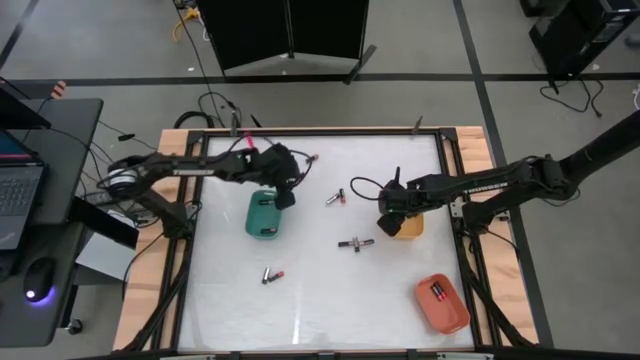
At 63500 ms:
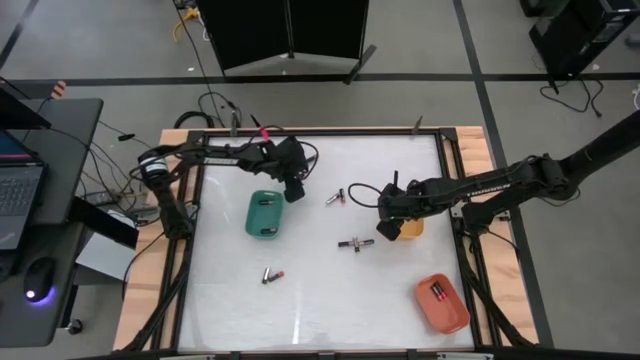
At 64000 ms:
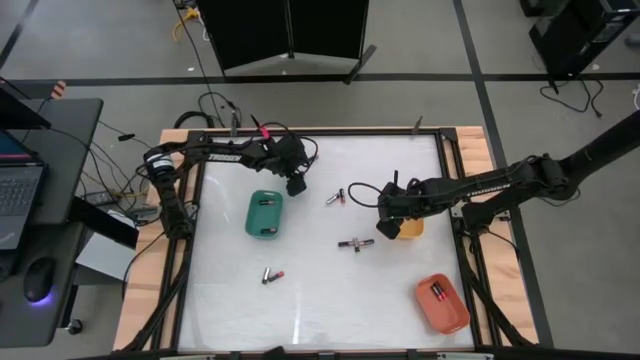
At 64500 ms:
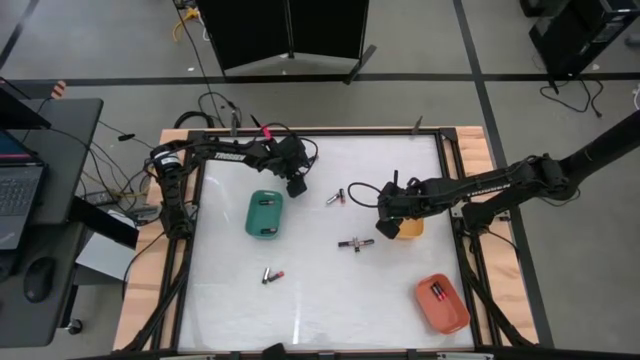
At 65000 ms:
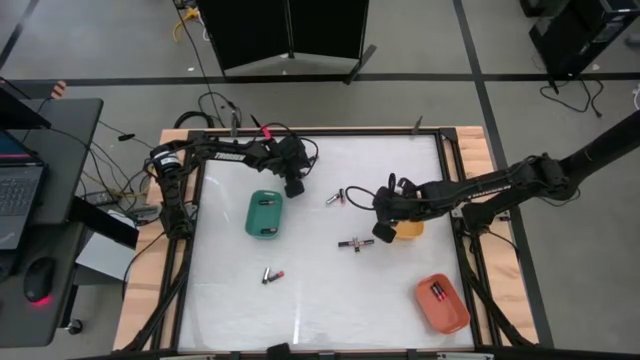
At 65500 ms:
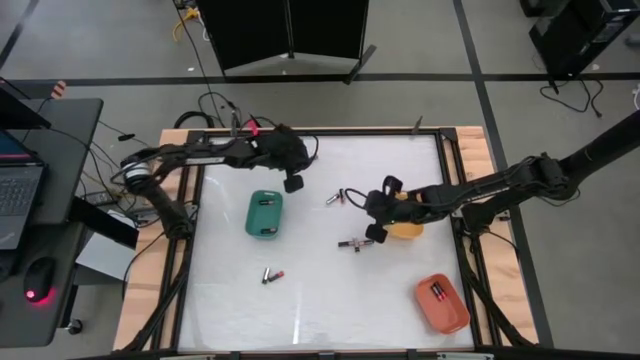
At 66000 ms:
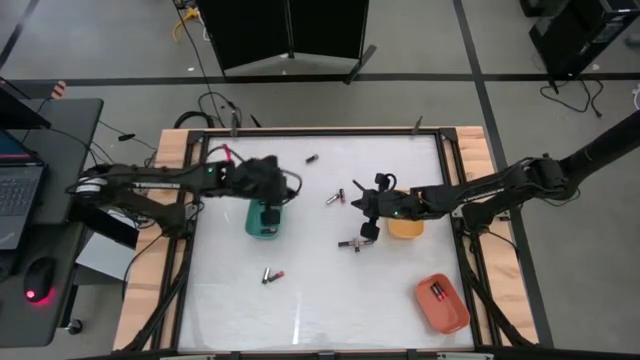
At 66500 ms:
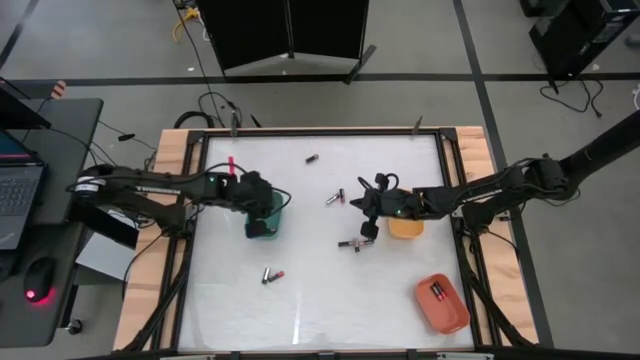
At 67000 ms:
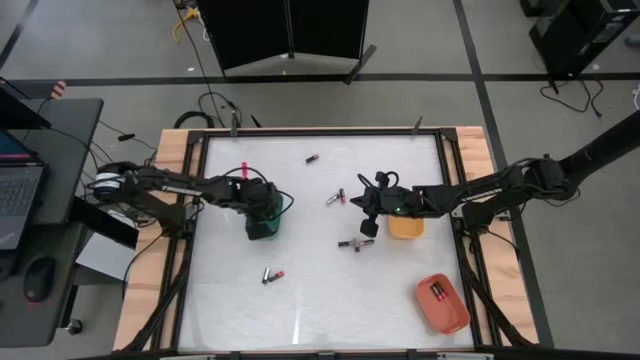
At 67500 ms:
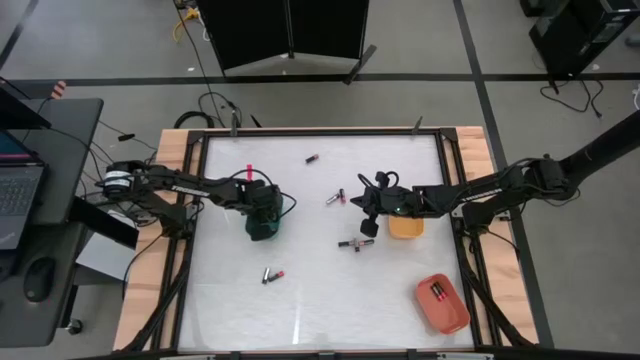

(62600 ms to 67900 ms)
Task: Sort batteries
Put the black and copper battery into the green bin

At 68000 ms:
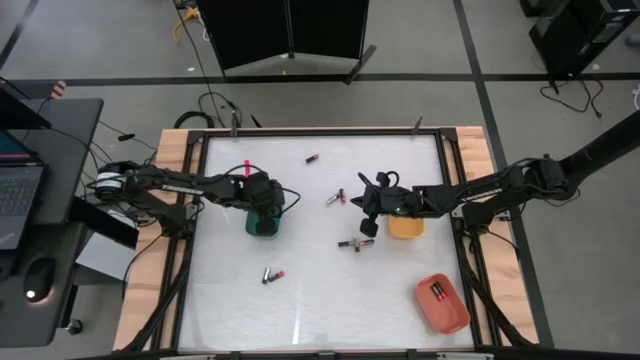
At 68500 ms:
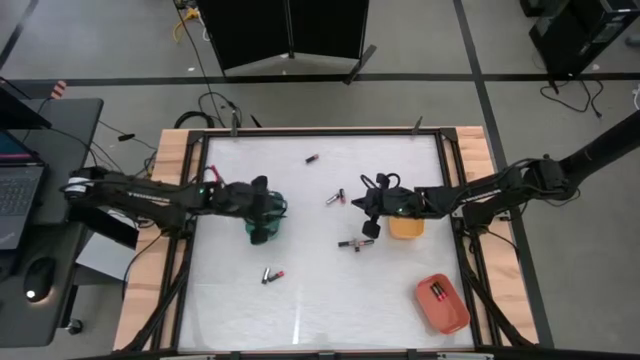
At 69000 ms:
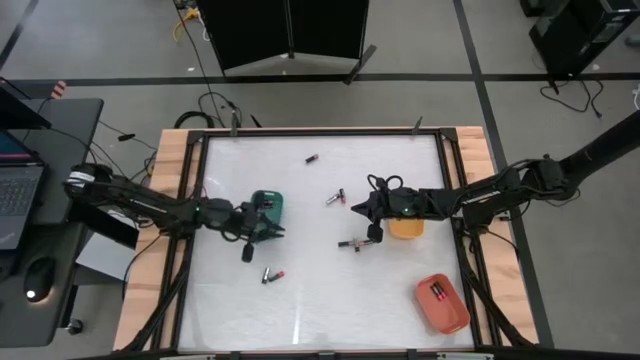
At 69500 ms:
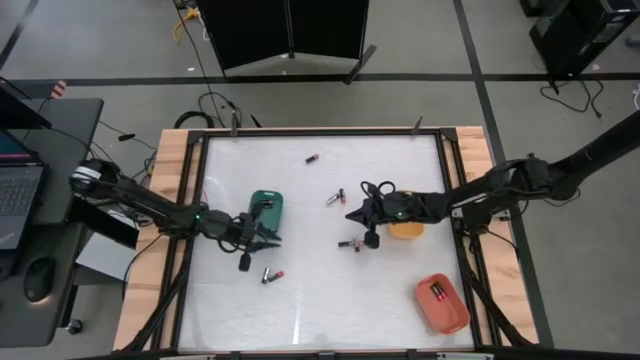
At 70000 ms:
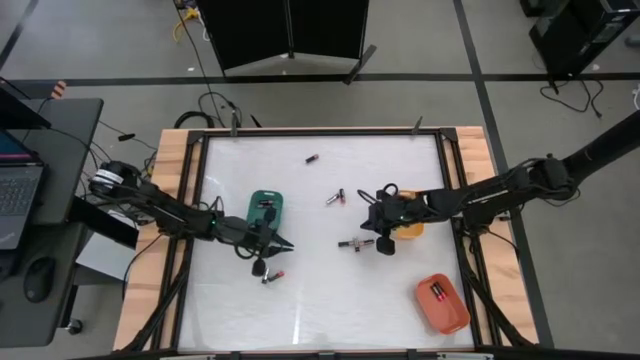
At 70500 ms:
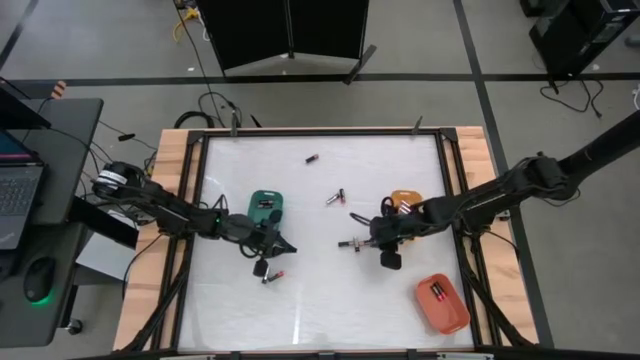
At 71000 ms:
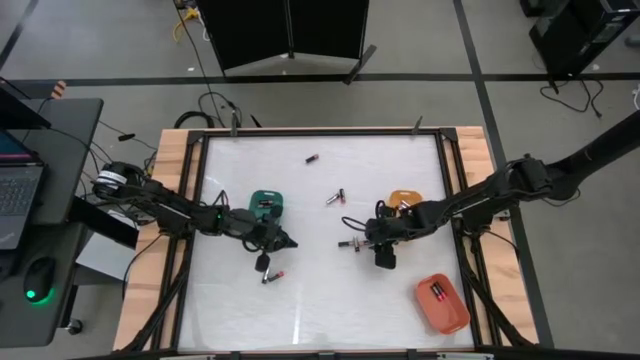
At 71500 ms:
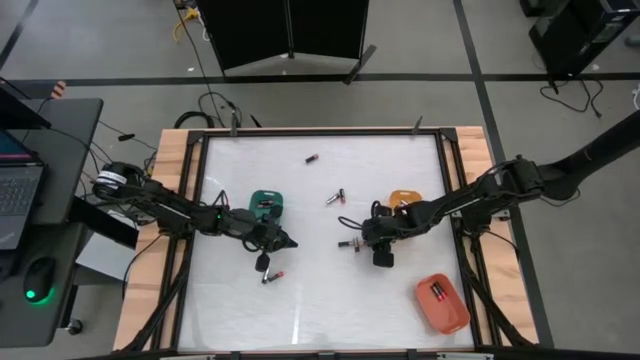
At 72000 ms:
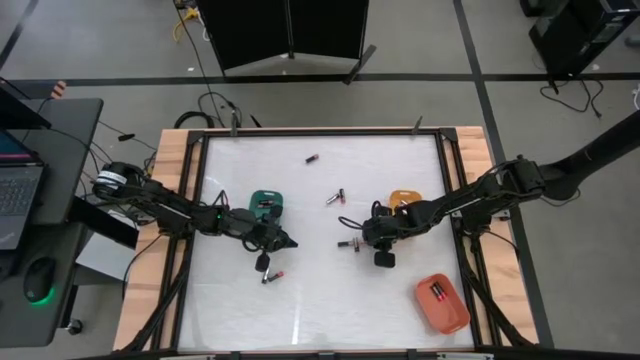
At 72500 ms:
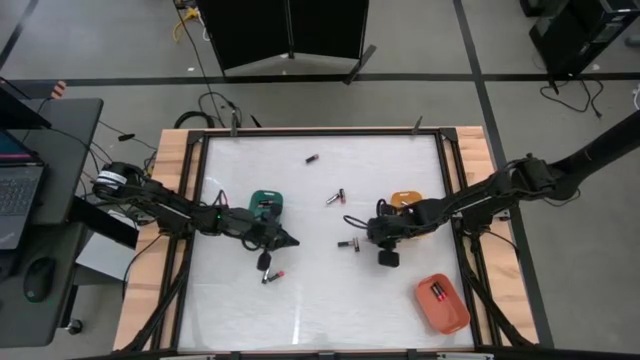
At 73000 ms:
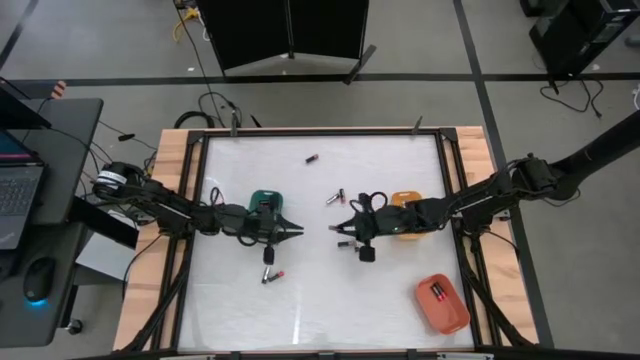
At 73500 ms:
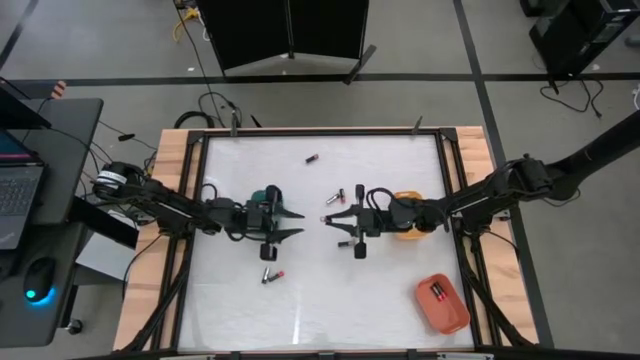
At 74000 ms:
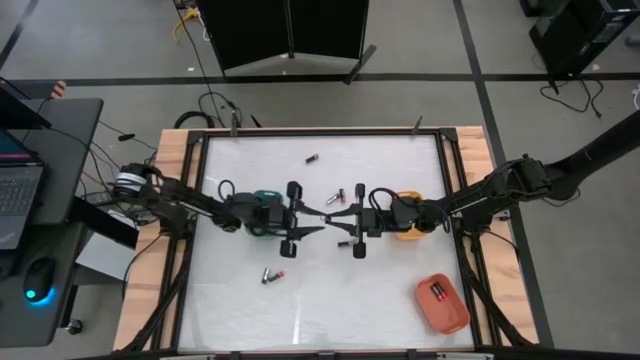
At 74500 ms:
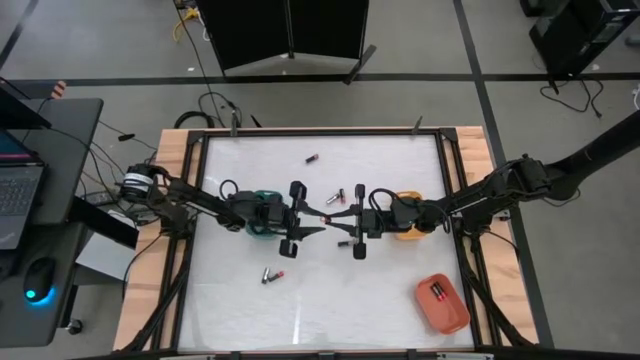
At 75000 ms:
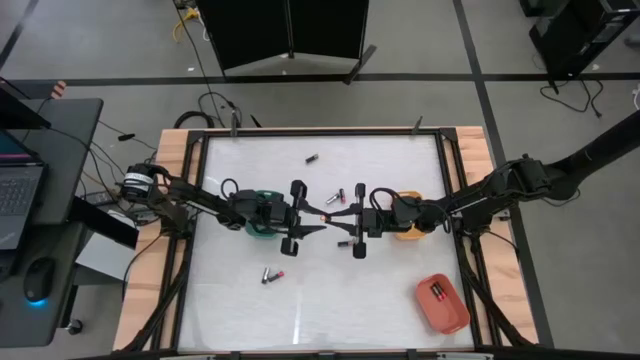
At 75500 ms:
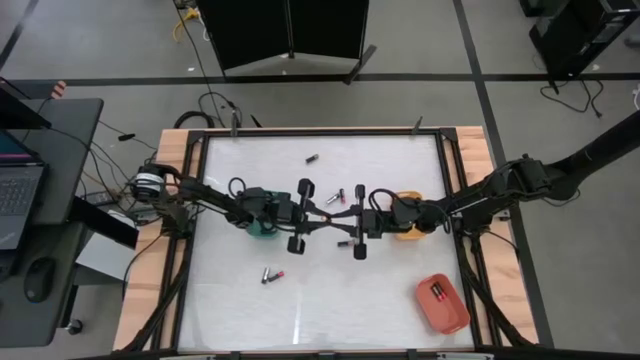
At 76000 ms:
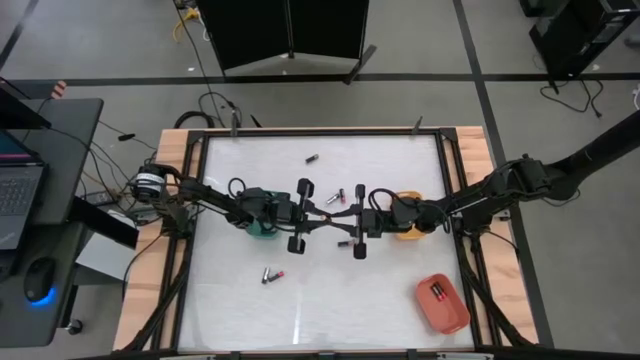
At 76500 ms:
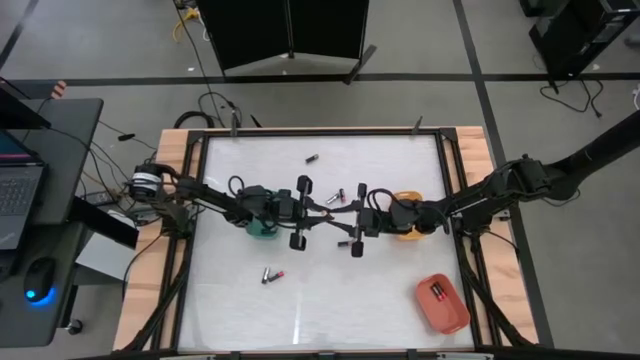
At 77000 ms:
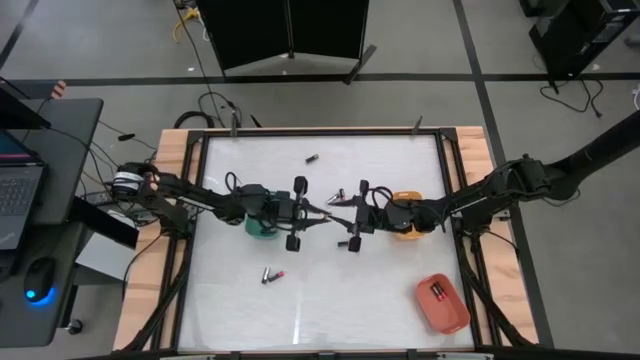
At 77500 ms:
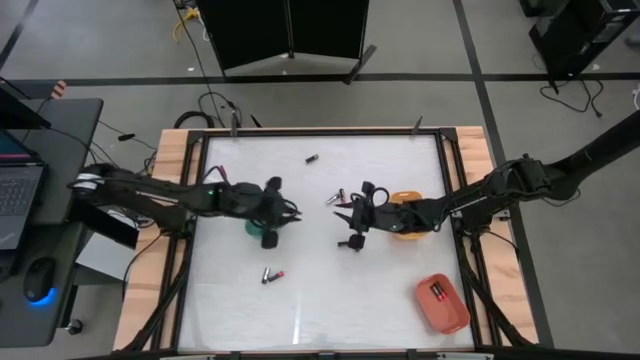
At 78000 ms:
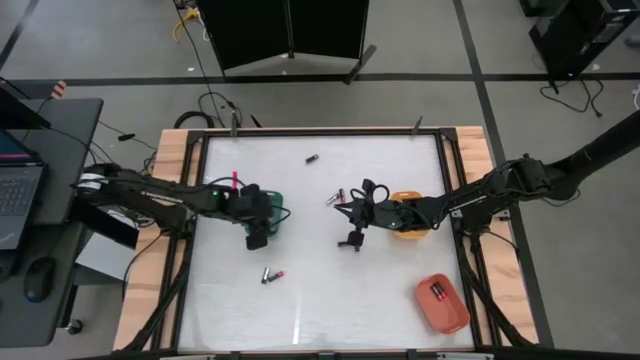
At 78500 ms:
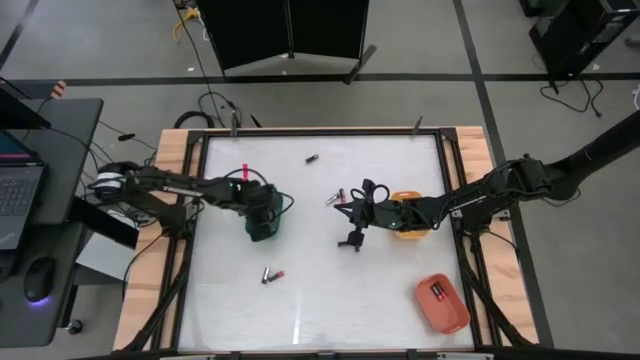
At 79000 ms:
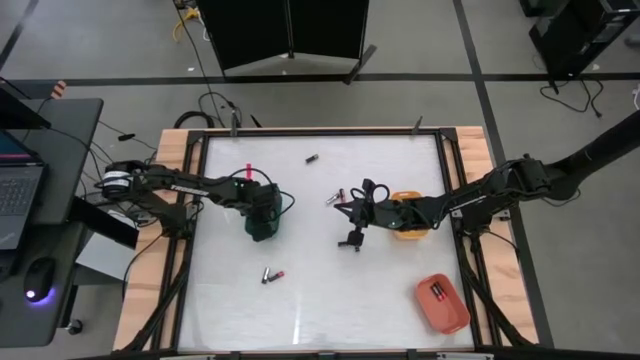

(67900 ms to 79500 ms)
Put the black and copper battery into the green bin

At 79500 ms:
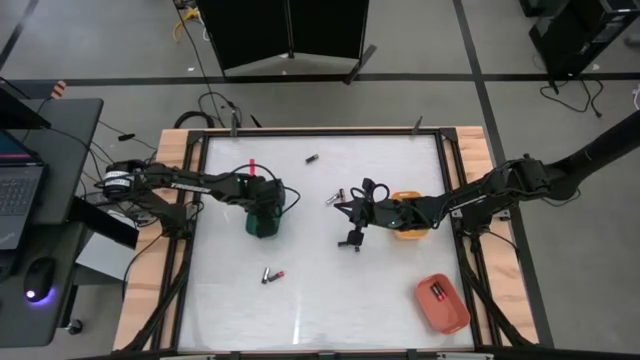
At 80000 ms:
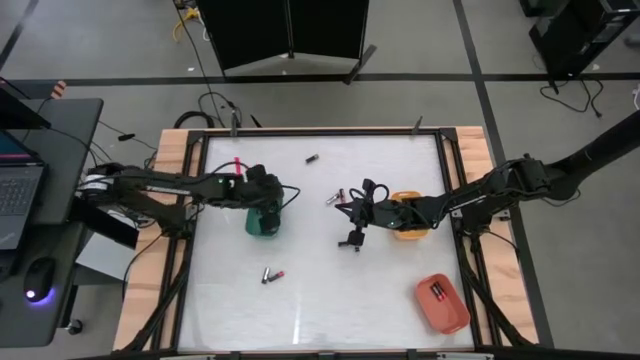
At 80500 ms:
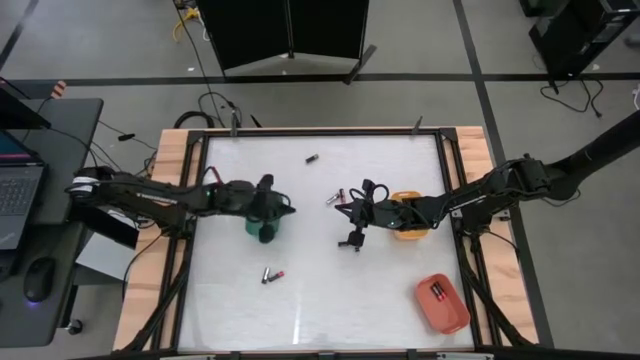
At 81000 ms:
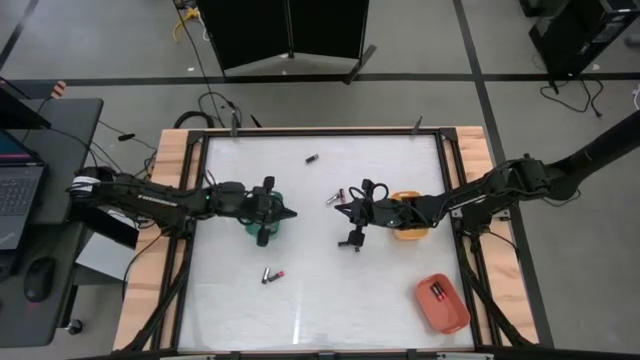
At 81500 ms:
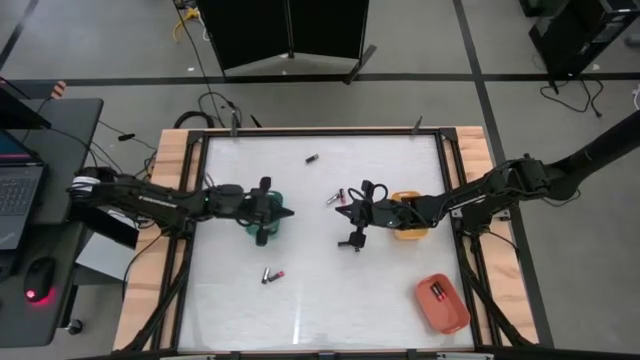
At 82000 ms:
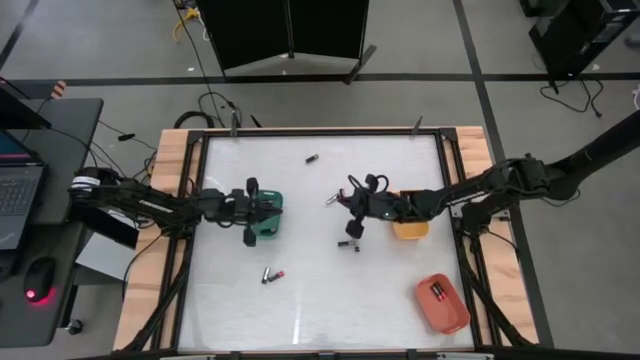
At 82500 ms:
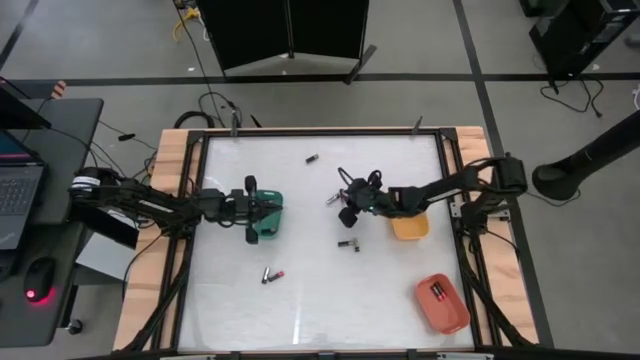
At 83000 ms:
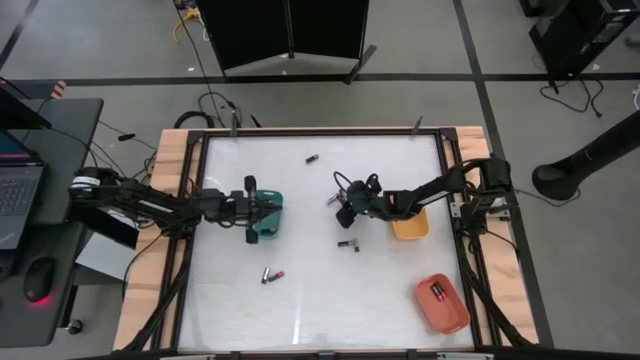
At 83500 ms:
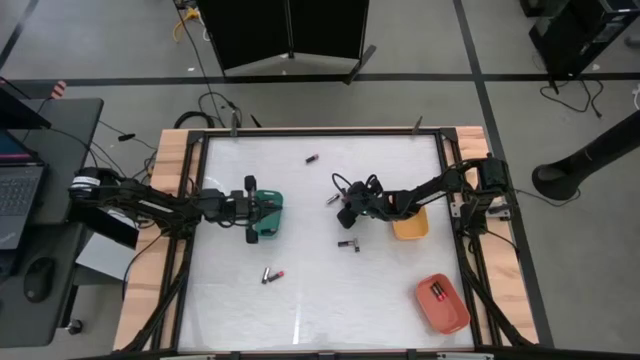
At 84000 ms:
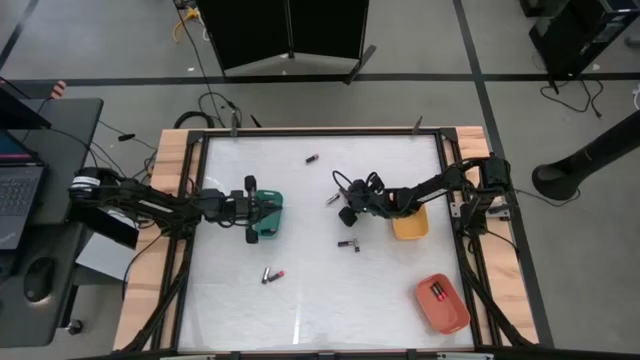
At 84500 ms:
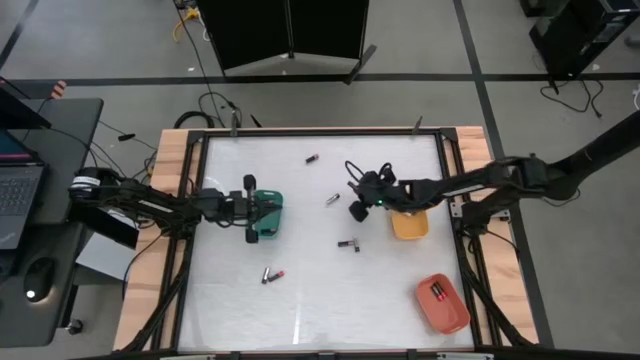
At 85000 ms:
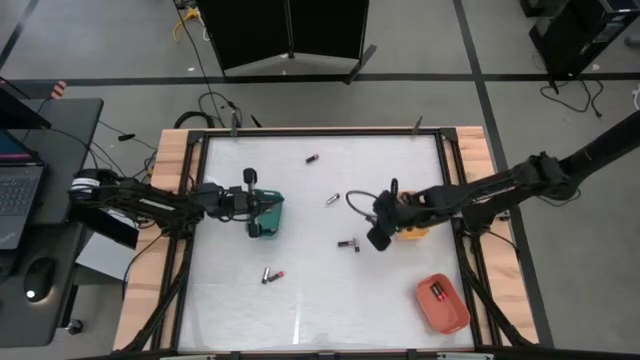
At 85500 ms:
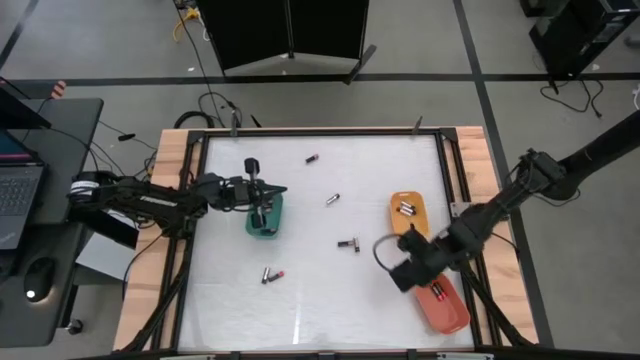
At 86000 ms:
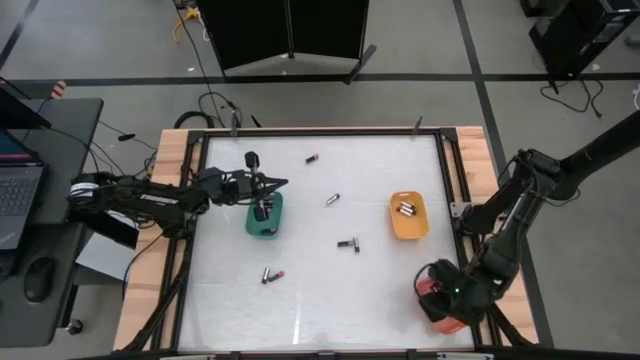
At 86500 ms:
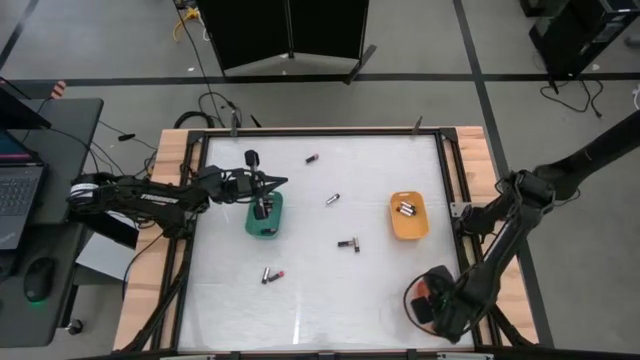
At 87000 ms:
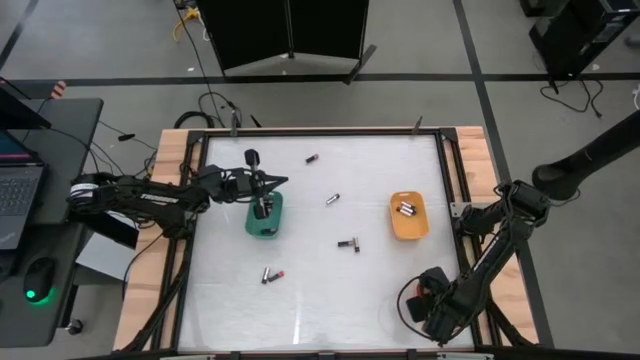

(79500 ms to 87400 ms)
Put the black and red battery into the orange bin
